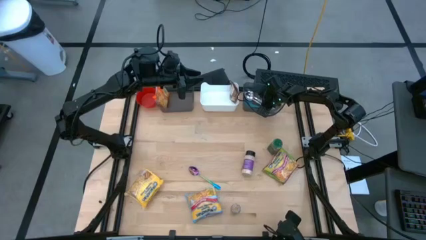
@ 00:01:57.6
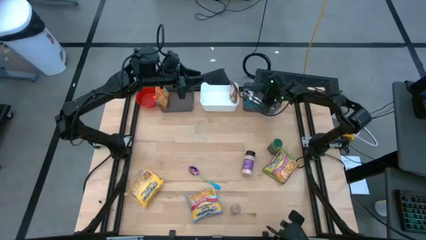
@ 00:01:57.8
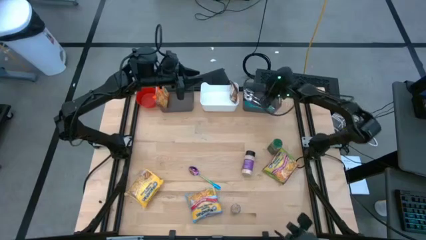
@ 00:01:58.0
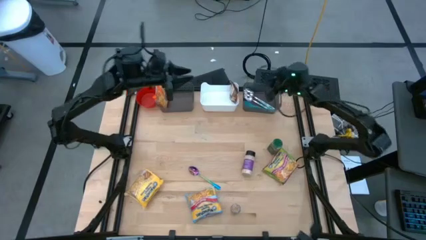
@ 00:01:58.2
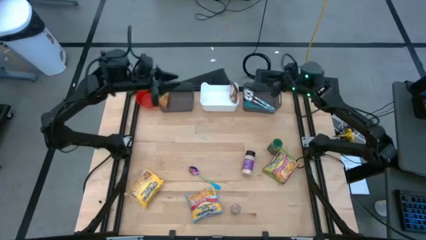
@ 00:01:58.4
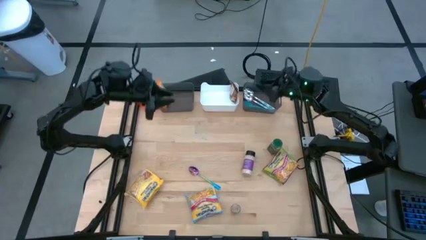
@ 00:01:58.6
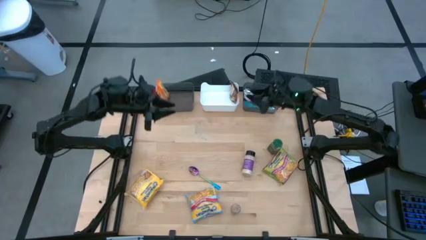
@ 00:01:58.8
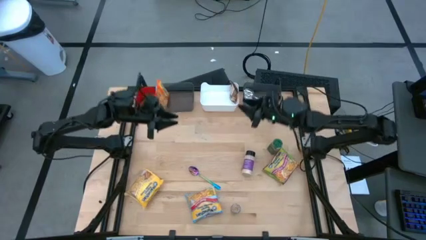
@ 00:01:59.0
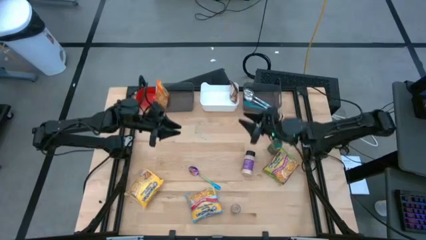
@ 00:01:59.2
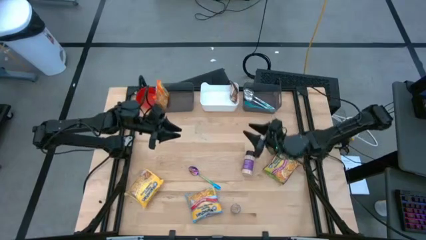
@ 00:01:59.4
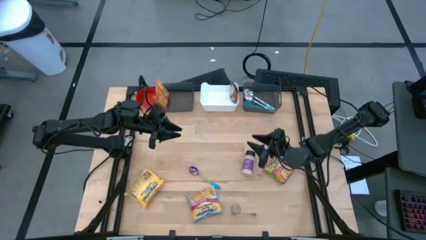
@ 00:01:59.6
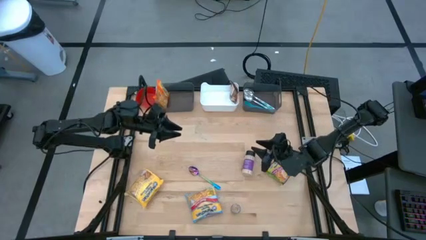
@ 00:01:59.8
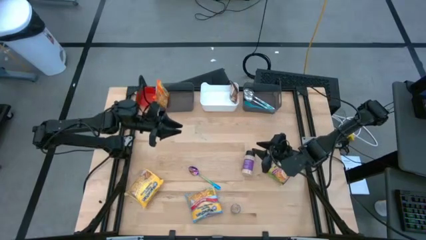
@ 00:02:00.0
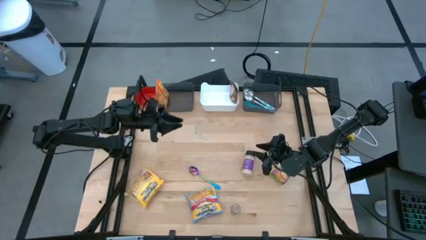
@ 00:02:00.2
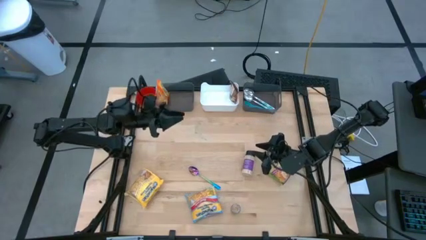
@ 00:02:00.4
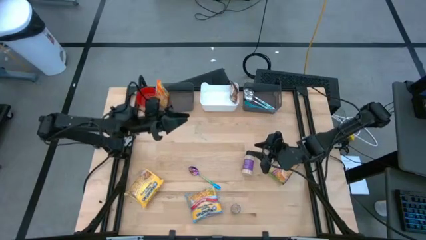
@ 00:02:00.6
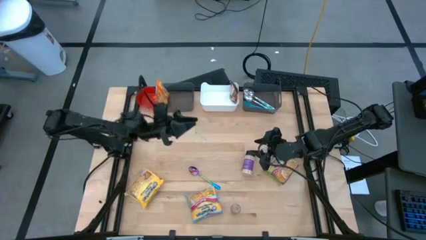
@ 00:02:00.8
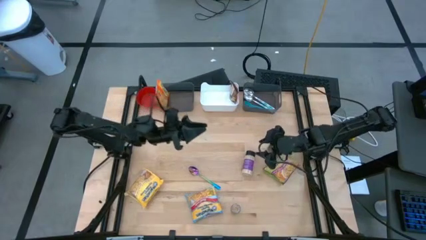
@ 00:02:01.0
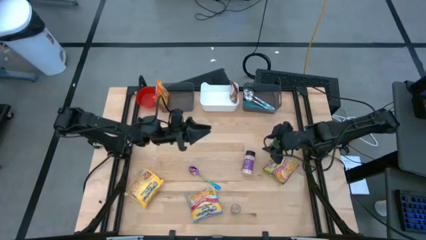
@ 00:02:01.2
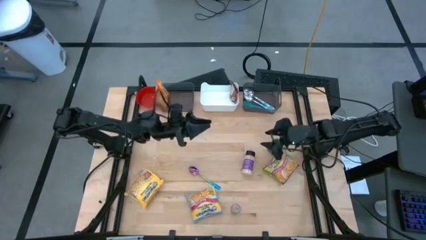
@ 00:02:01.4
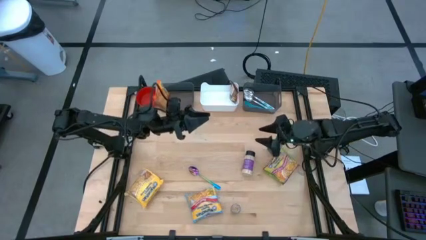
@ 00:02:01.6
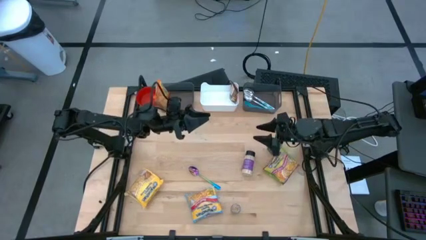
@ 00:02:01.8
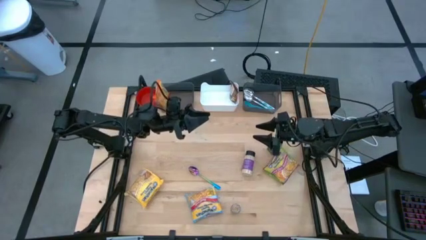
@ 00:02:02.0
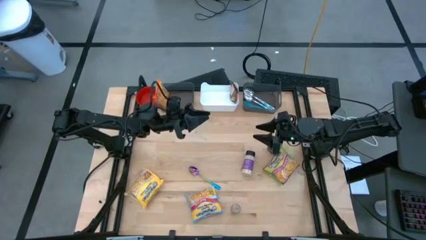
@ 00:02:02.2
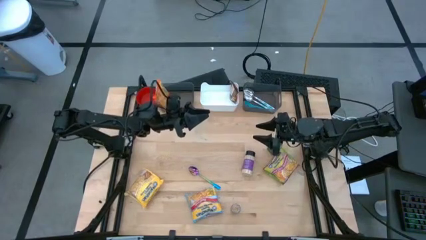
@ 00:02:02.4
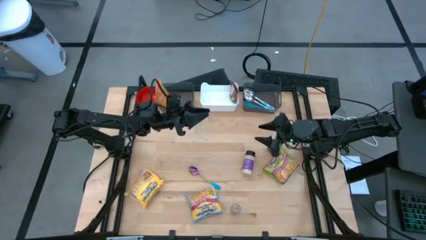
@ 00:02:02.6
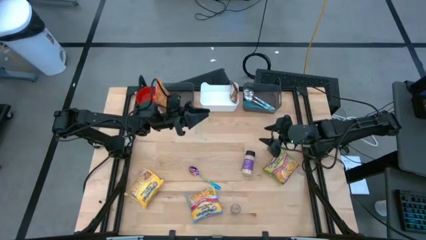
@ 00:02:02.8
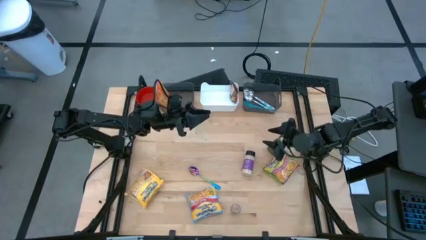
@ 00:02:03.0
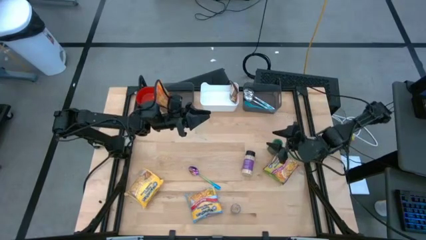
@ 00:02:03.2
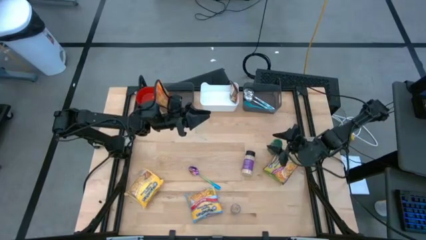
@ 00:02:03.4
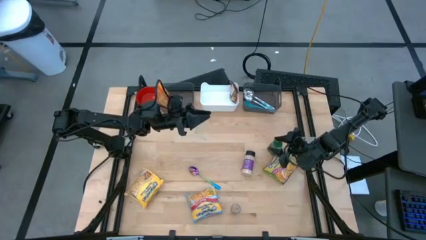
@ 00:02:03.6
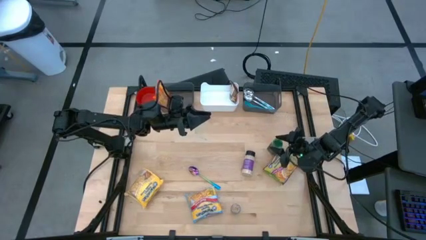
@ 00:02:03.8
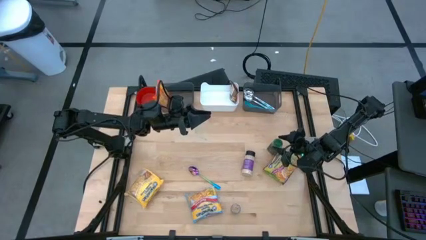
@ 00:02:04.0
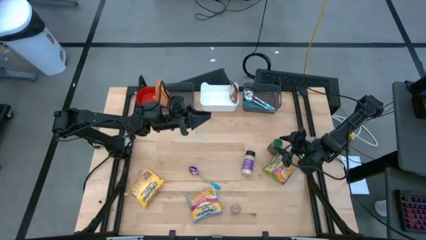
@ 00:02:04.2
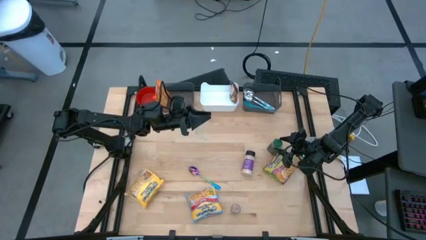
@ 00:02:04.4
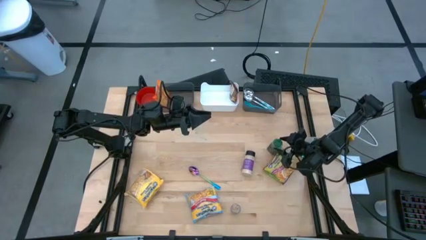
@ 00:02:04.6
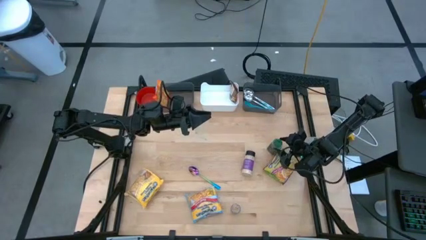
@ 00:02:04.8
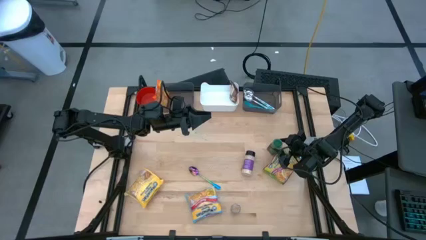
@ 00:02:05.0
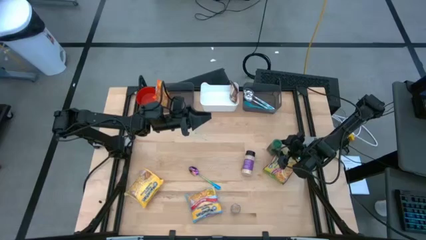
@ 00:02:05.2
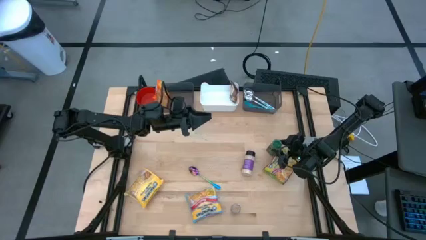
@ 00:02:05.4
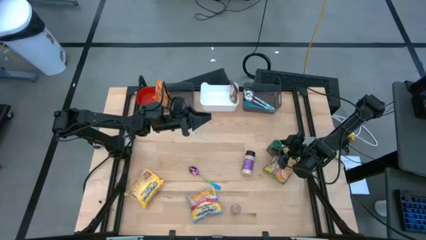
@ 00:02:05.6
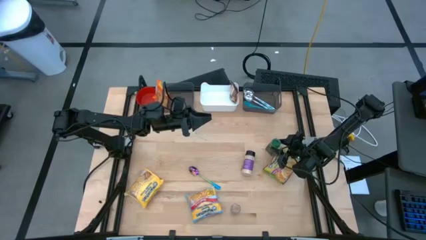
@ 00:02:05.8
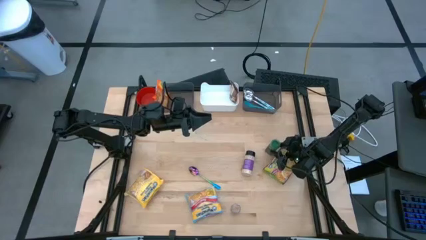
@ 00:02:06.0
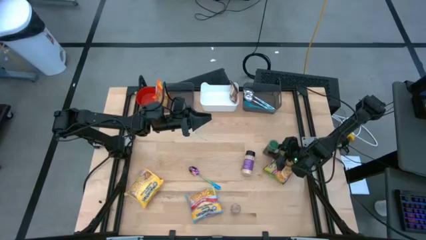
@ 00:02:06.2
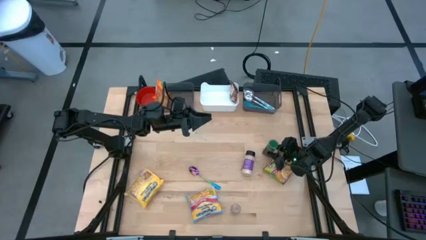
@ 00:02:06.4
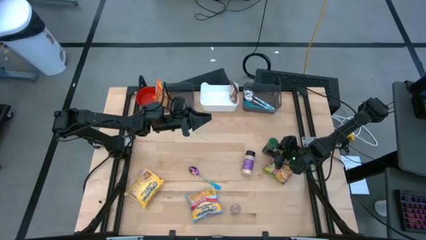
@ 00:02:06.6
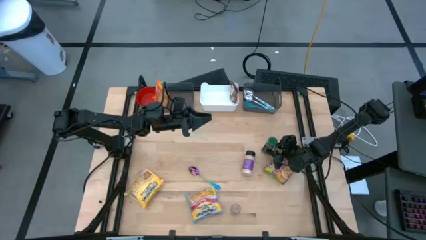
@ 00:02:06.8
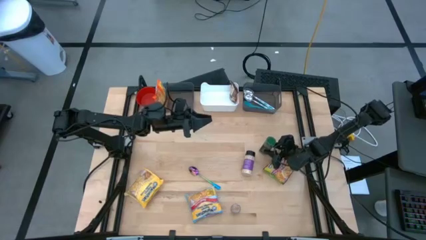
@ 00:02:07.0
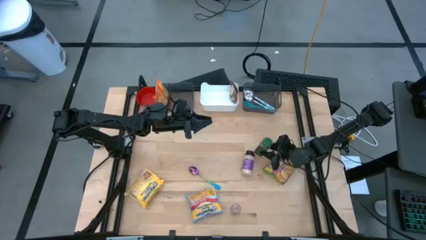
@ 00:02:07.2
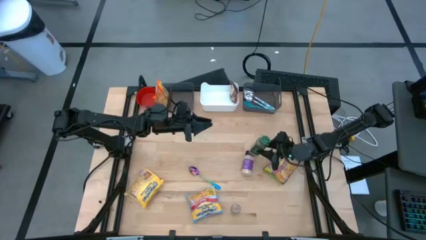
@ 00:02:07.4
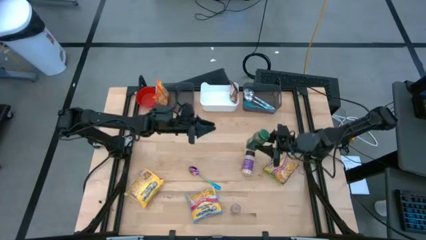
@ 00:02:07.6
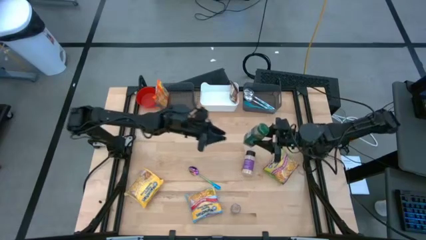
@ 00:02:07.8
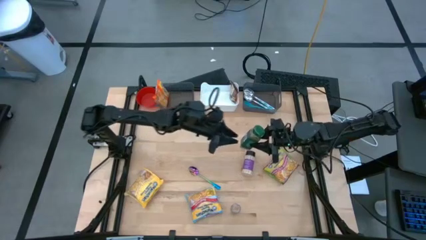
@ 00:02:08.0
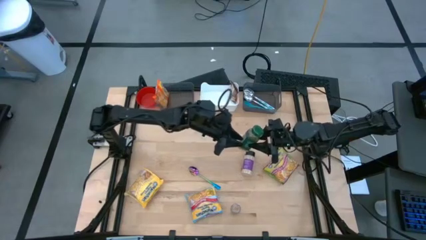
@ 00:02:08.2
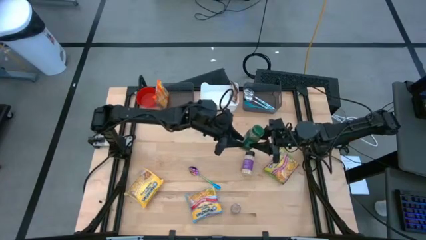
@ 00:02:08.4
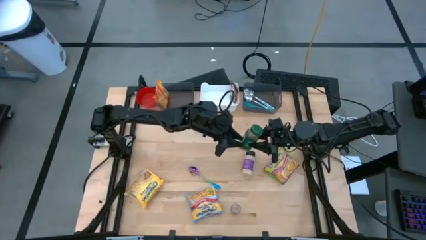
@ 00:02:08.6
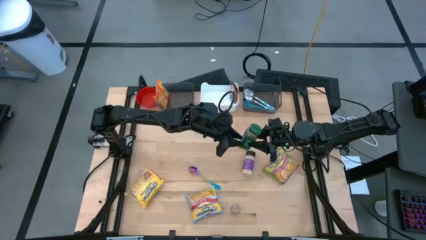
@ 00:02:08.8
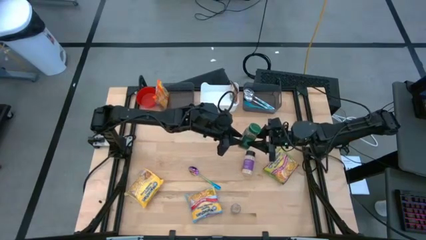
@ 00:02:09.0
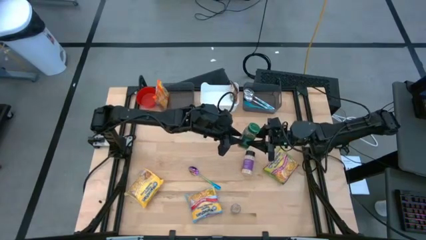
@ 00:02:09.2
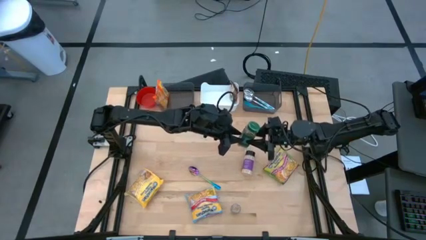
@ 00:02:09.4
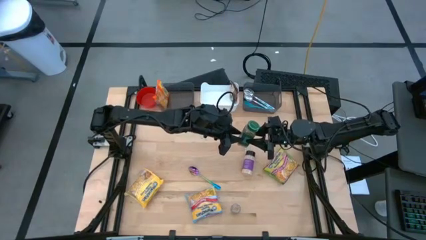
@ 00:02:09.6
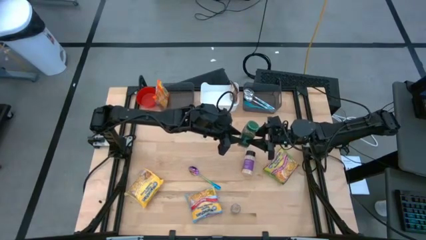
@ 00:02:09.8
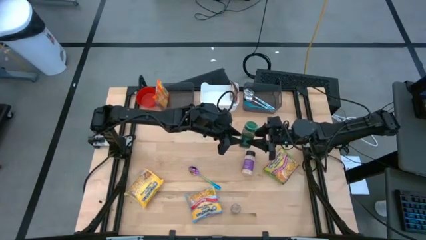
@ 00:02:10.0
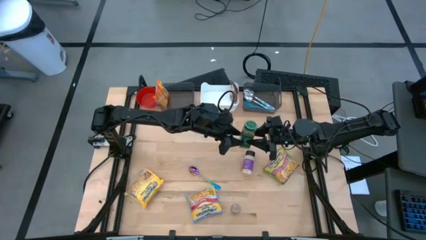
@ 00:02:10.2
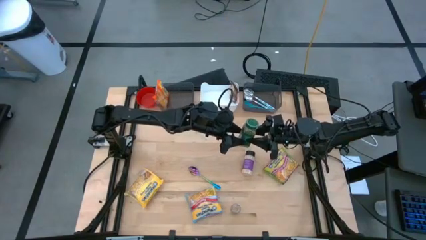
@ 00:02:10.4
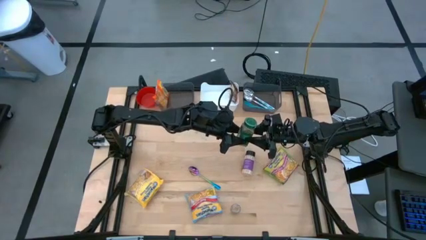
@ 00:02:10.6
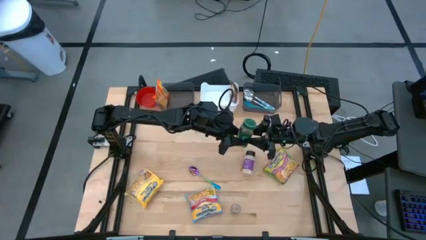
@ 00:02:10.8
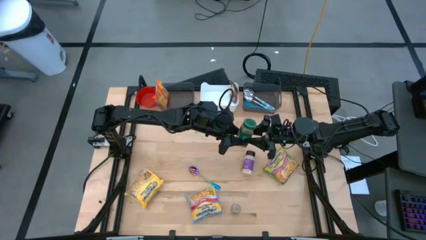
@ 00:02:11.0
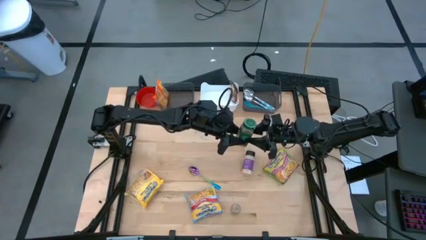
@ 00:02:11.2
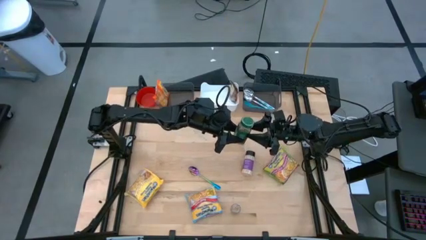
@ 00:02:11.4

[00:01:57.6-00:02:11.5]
Task: Pick & Place Food Item
Put the green seasoning bottle into the white bin
